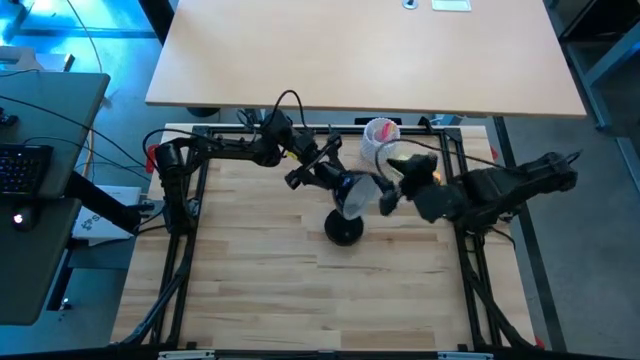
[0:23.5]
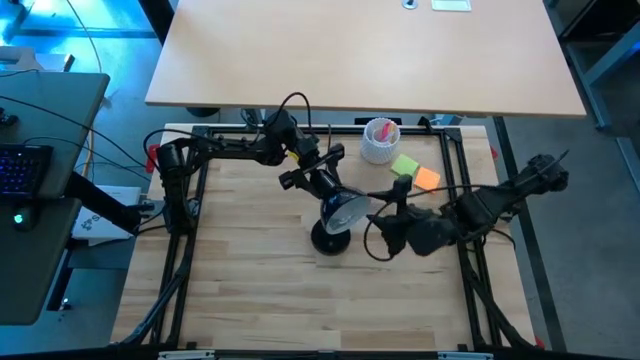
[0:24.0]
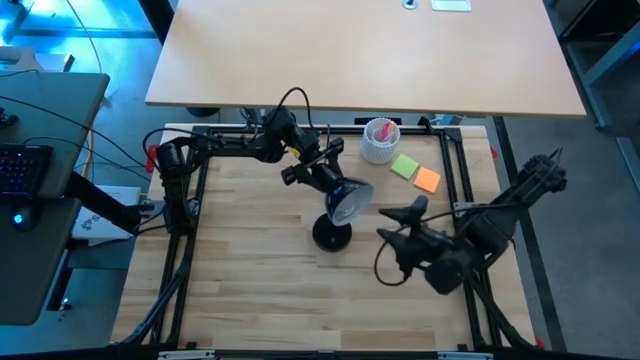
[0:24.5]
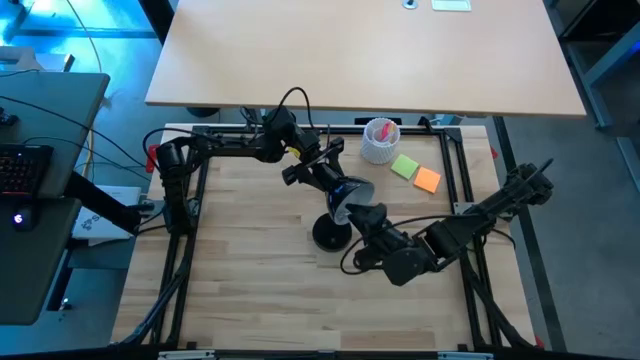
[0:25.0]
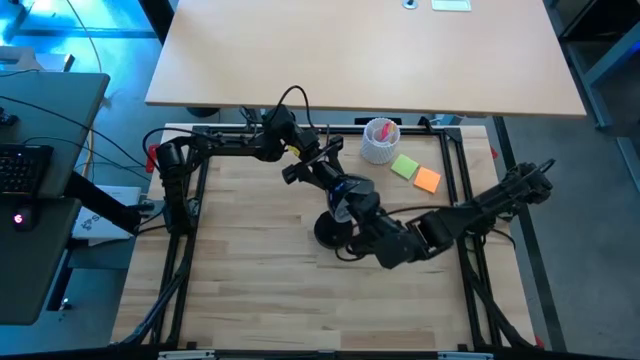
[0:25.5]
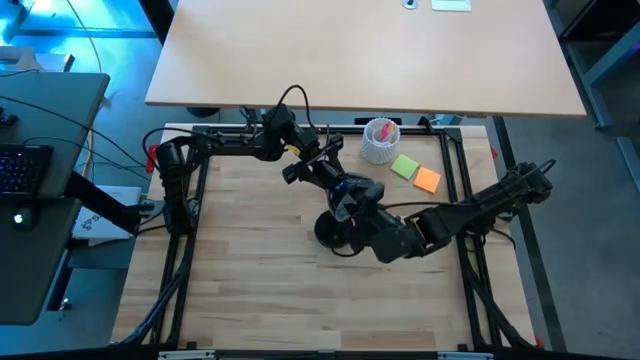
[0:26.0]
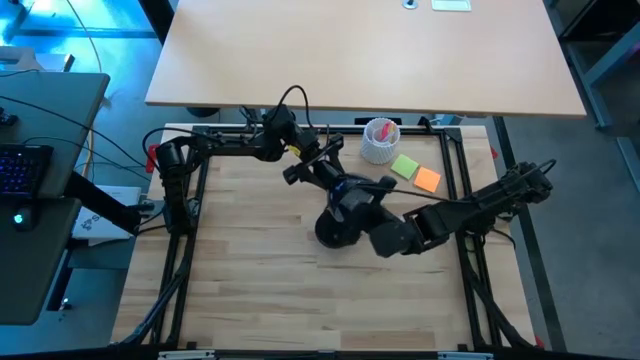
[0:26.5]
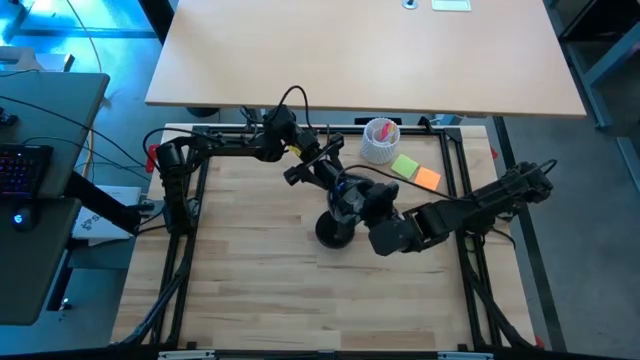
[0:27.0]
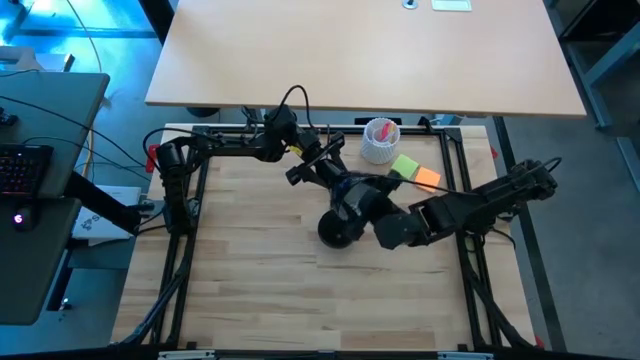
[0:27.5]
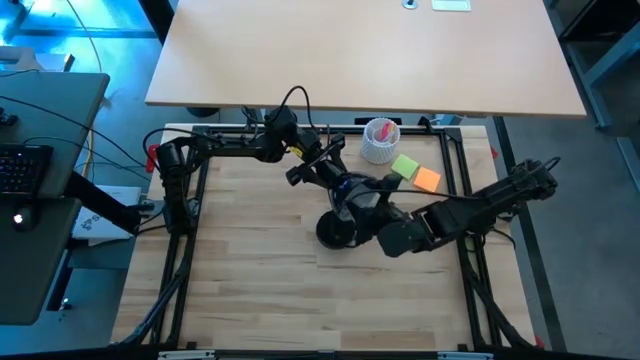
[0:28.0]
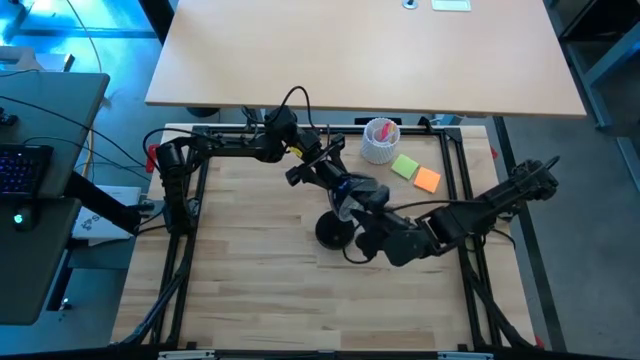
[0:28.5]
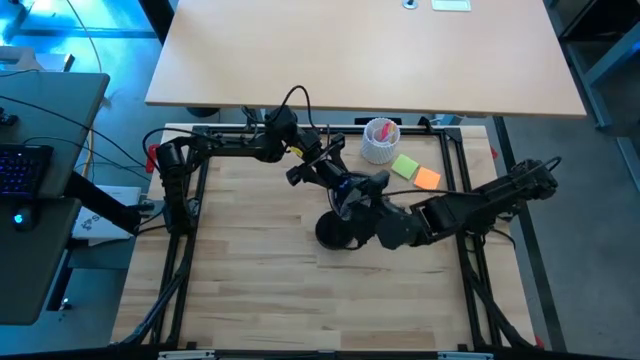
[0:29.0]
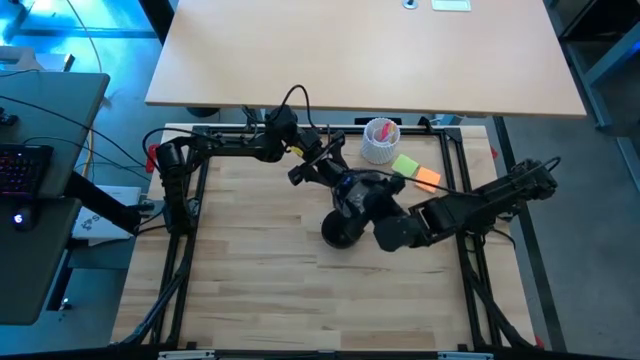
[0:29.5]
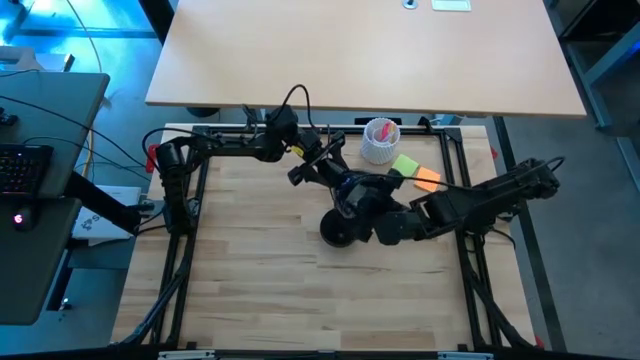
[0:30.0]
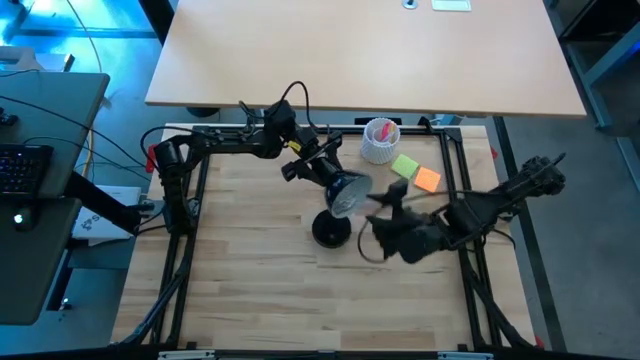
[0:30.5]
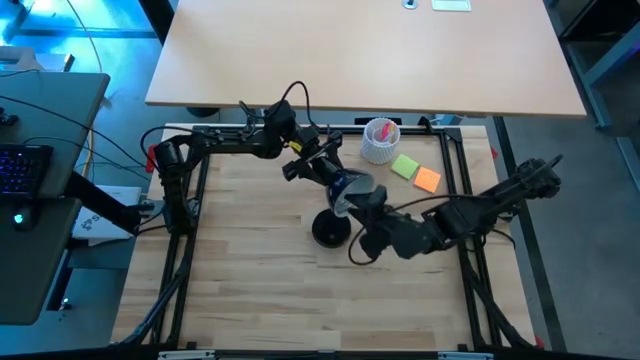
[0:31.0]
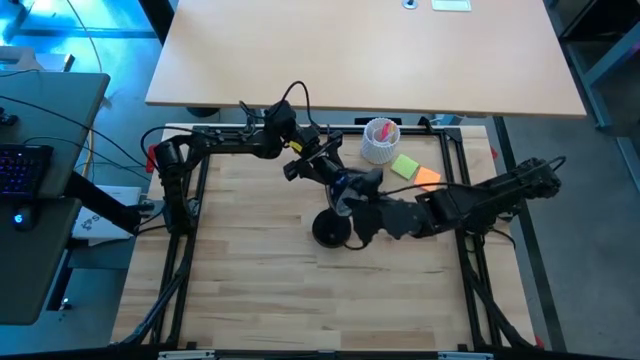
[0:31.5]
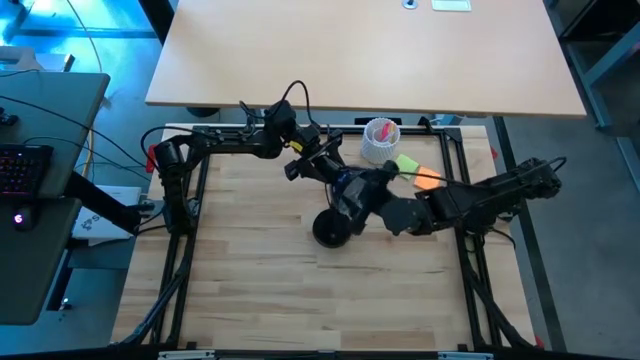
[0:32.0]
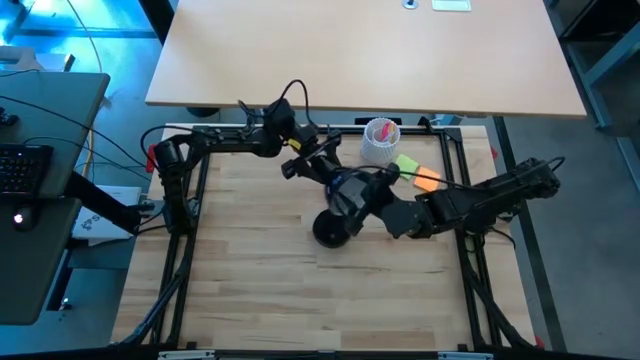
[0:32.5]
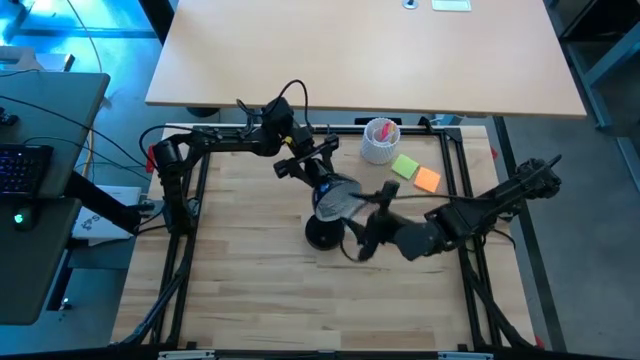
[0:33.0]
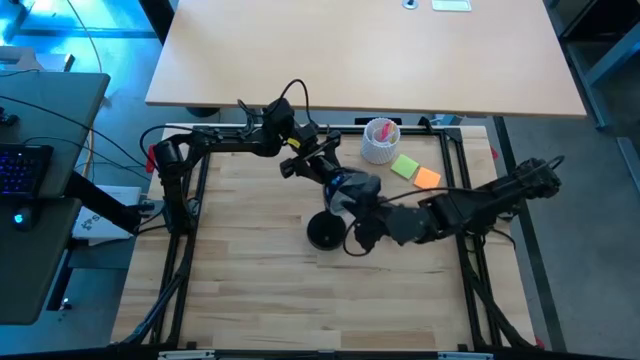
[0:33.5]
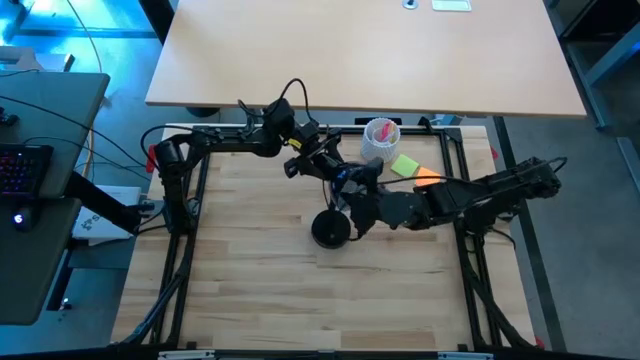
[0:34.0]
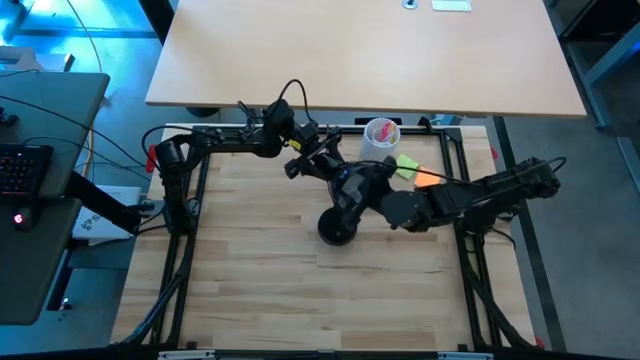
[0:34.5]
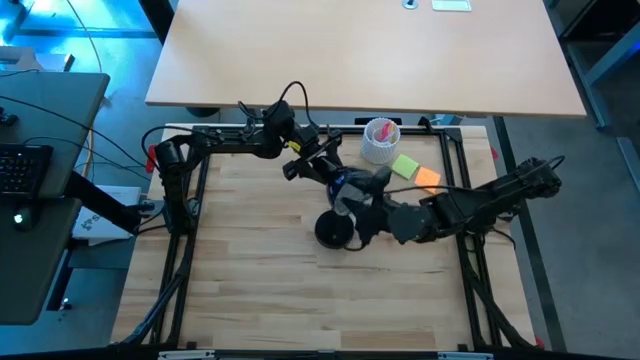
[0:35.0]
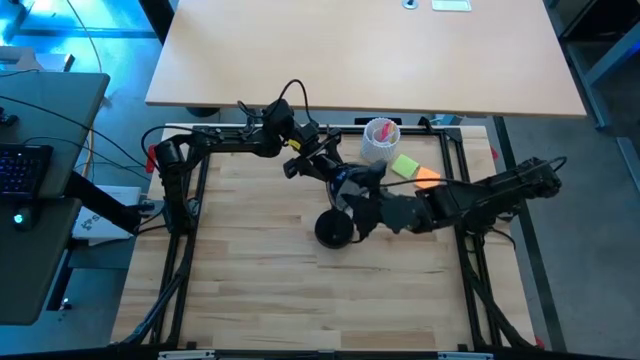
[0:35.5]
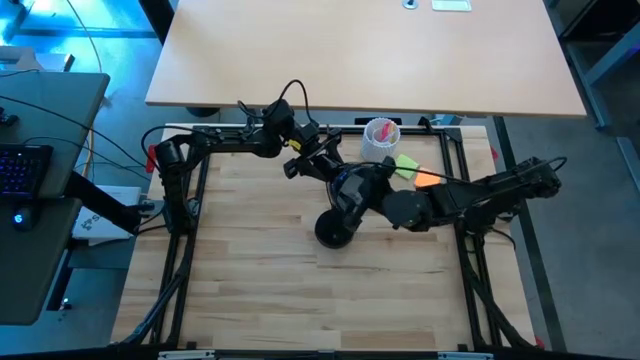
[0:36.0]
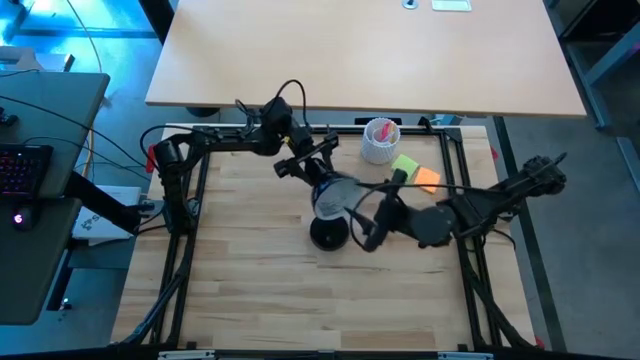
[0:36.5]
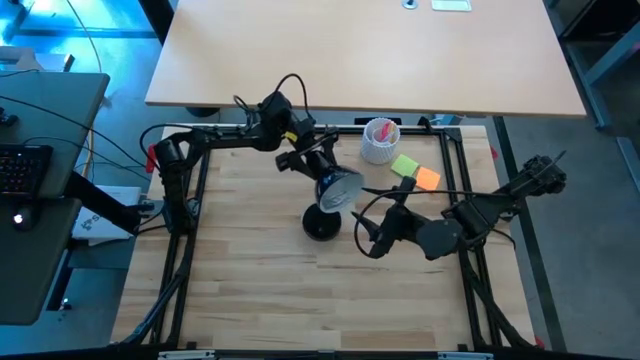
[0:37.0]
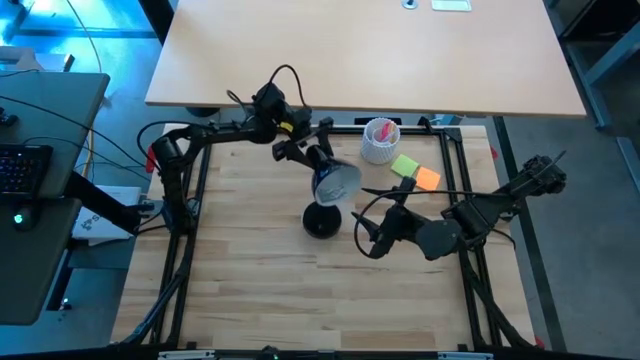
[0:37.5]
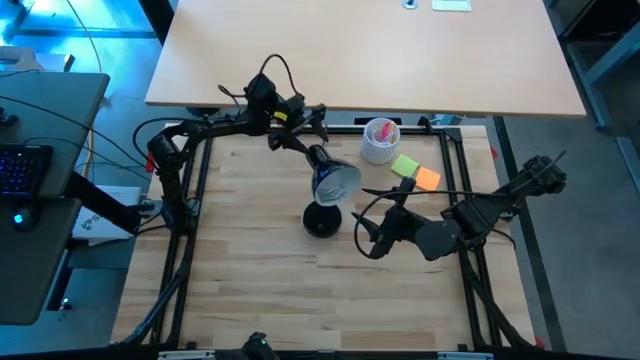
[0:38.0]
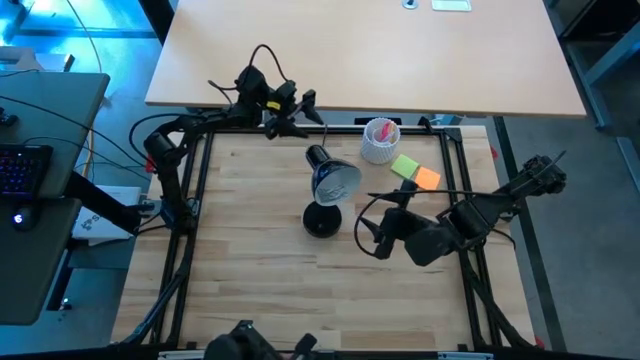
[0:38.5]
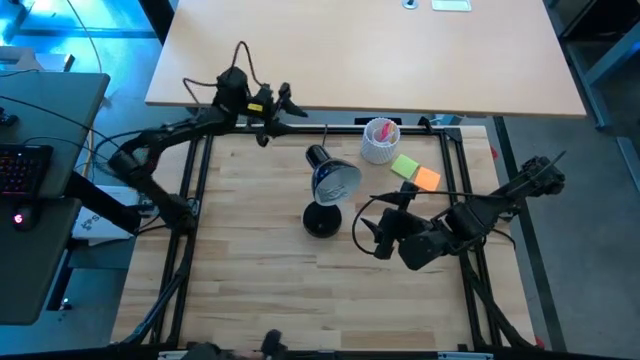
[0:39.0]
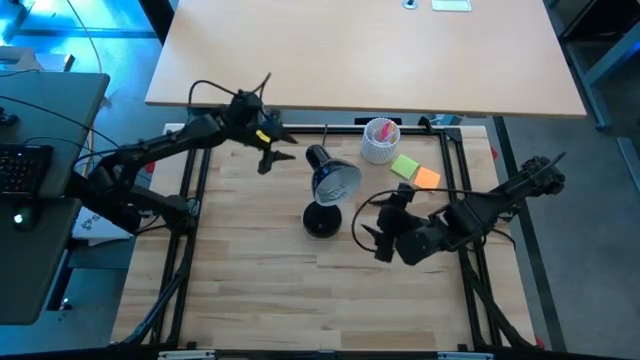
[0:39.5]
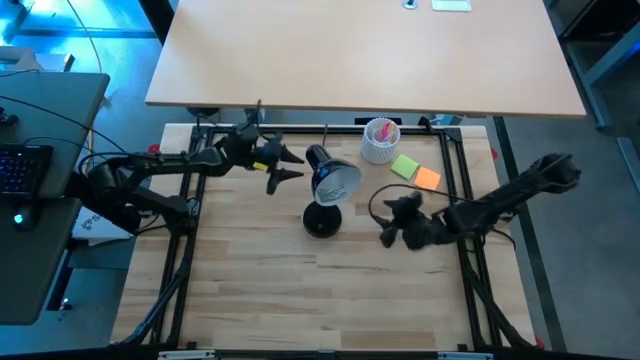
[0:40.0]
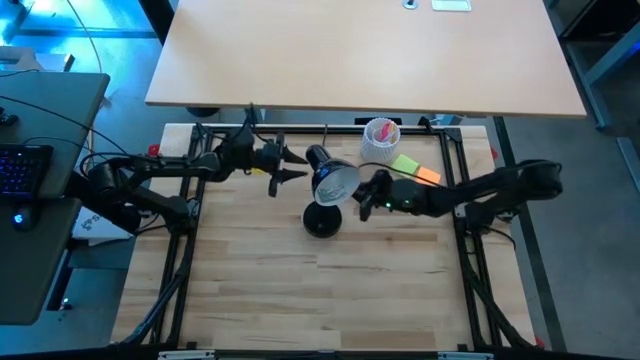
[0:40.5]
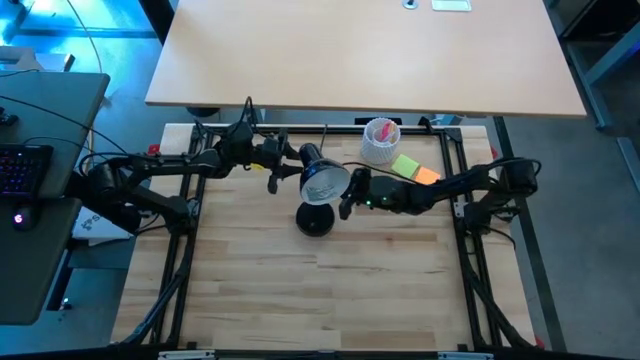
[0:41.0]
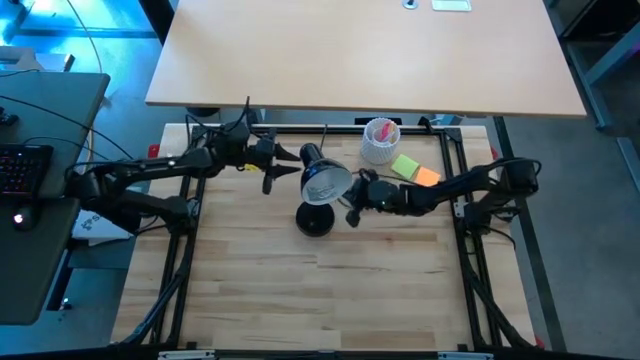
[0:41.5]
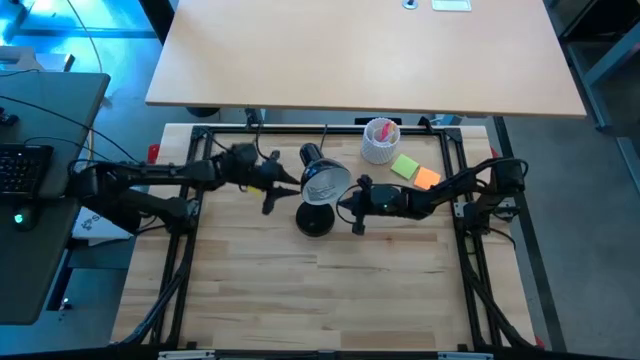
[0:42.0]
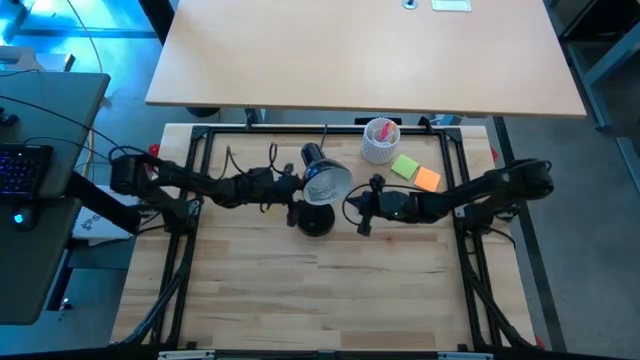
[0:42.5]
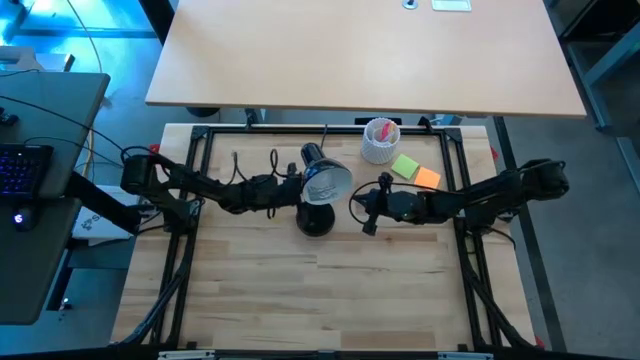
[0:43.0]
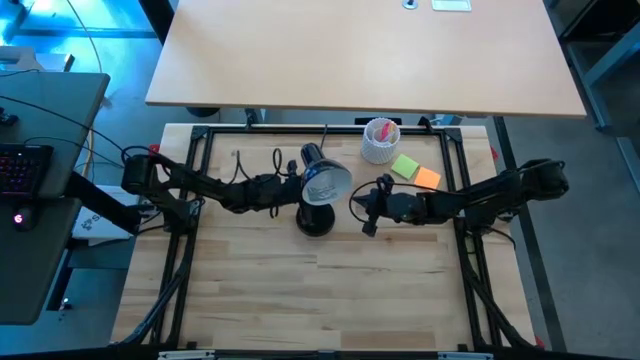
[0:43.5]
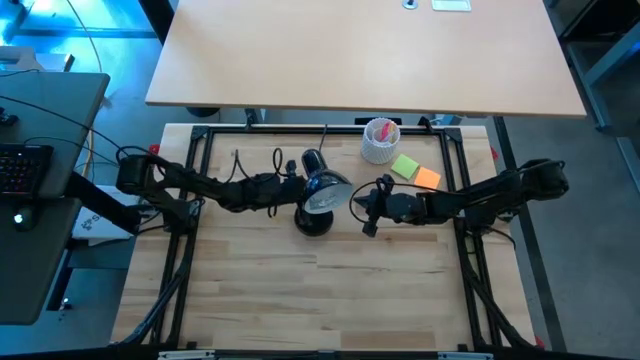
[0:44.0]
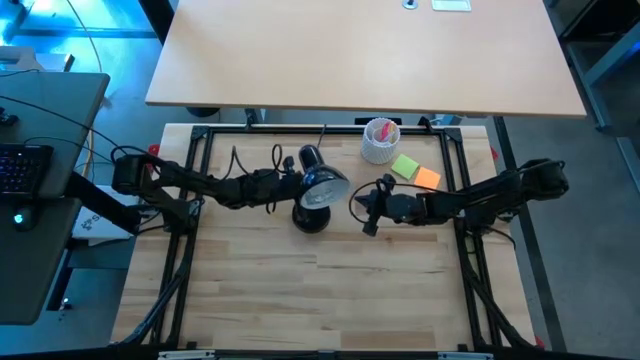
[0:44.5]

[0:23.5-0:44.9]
Task: Screw lightbulb
Insert the lightbulb into the desk lamp
